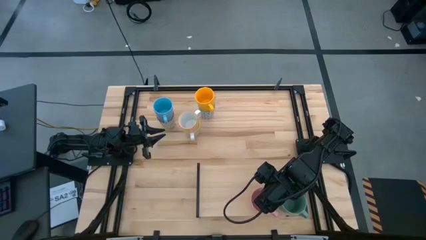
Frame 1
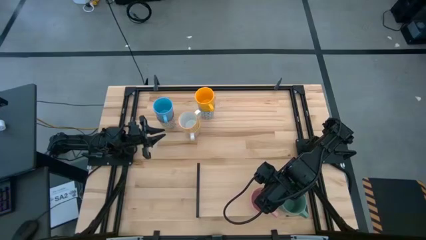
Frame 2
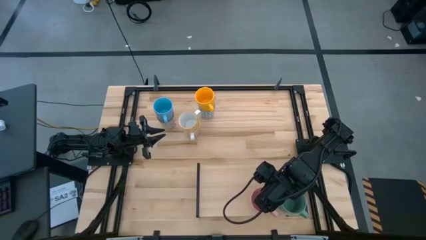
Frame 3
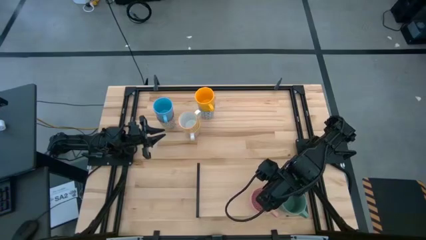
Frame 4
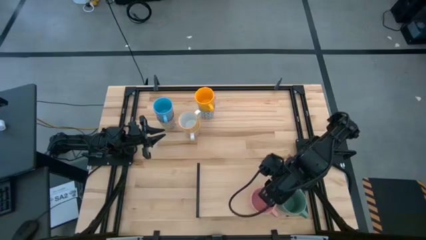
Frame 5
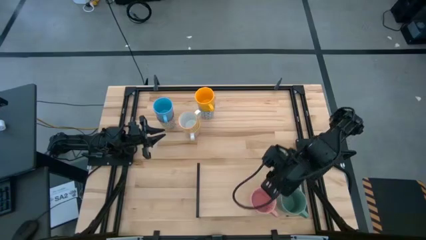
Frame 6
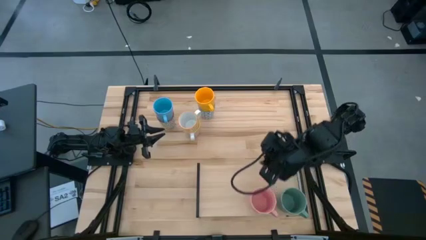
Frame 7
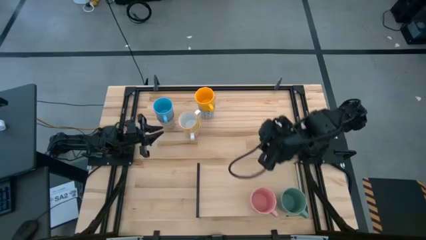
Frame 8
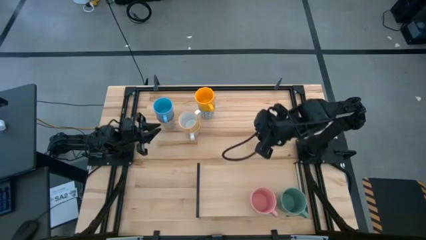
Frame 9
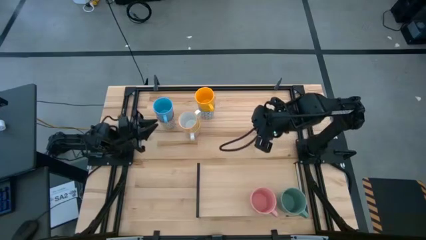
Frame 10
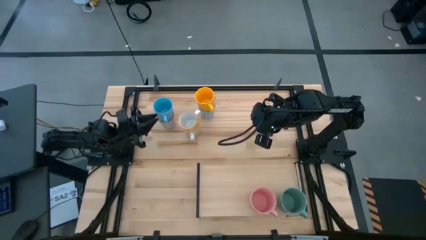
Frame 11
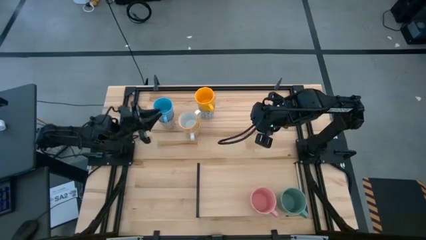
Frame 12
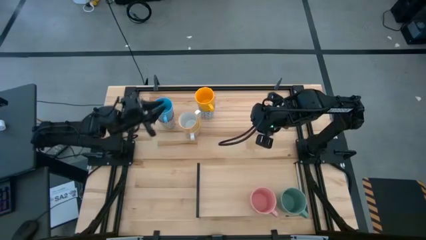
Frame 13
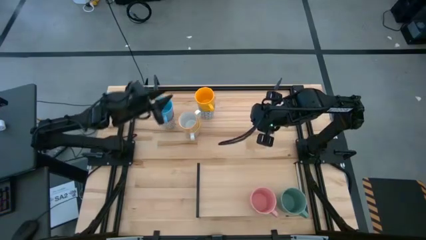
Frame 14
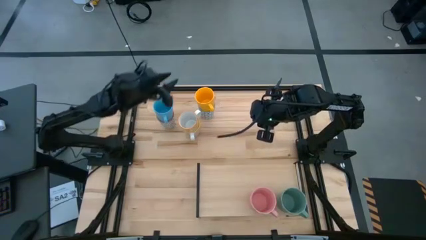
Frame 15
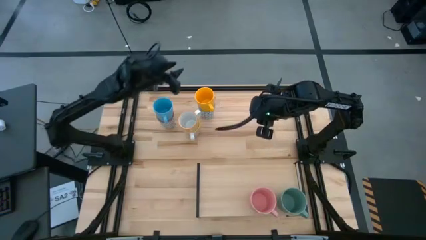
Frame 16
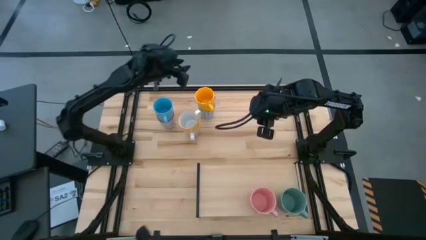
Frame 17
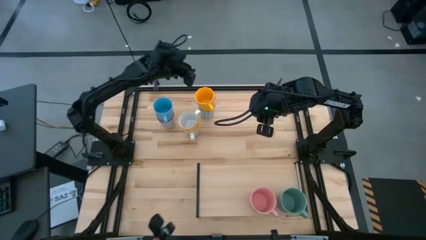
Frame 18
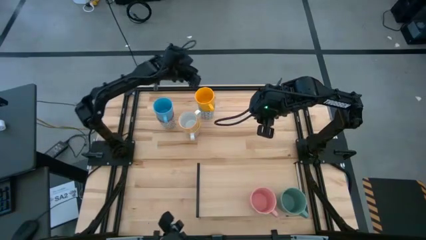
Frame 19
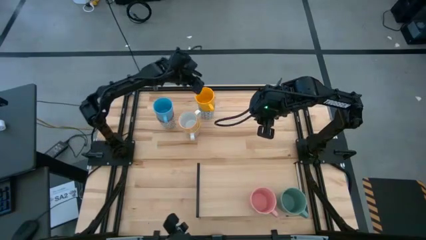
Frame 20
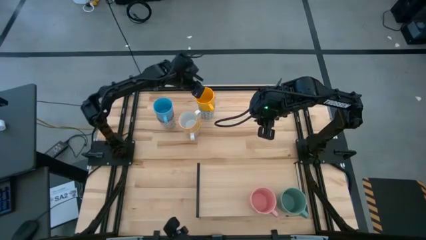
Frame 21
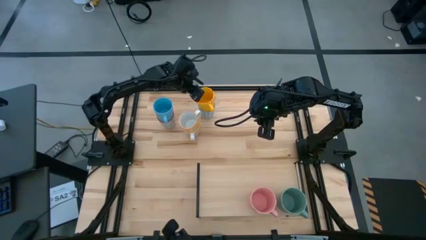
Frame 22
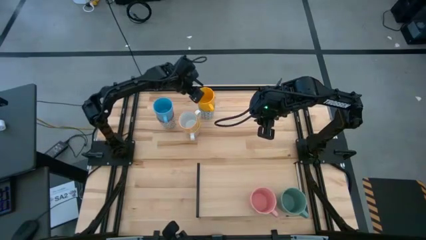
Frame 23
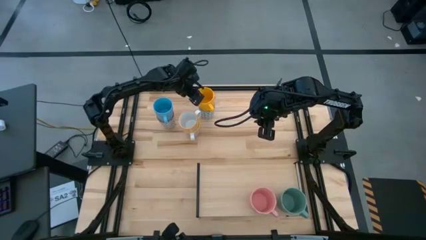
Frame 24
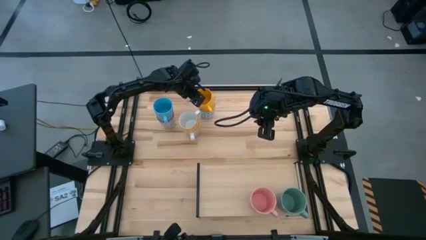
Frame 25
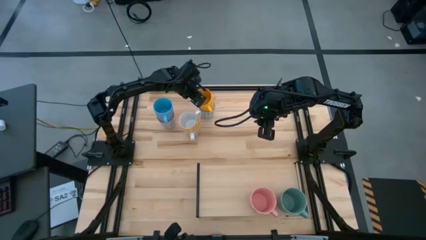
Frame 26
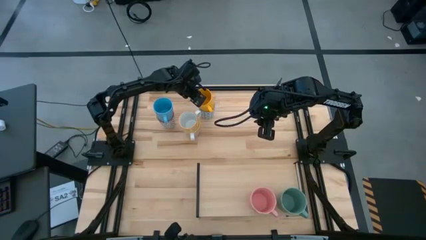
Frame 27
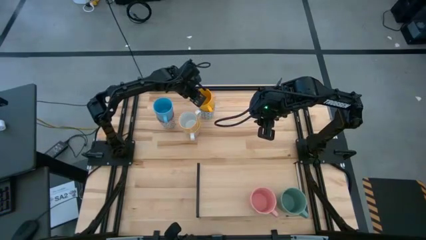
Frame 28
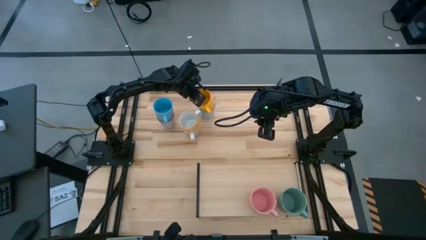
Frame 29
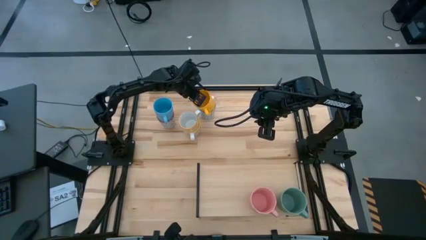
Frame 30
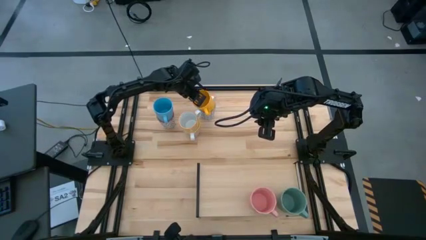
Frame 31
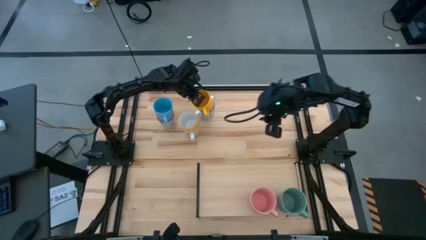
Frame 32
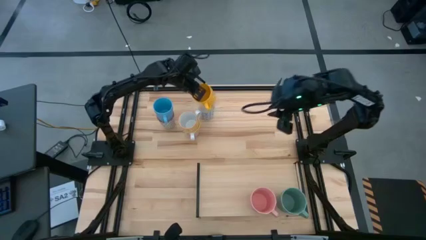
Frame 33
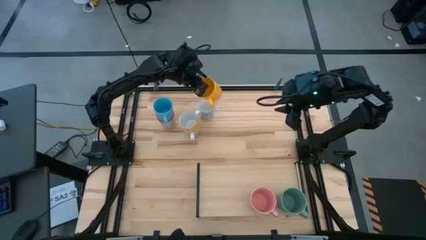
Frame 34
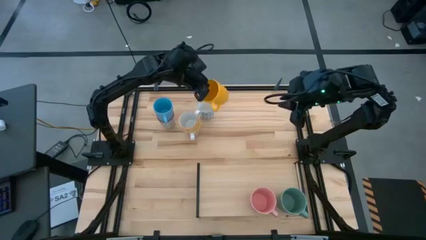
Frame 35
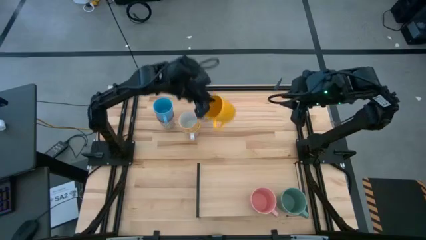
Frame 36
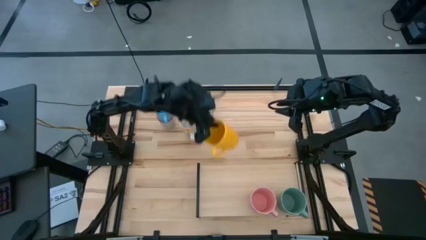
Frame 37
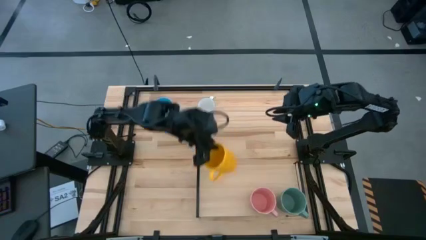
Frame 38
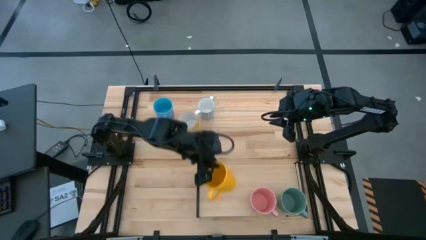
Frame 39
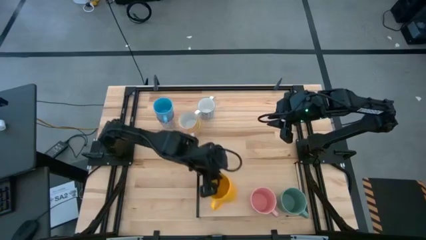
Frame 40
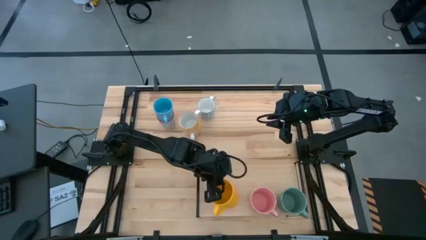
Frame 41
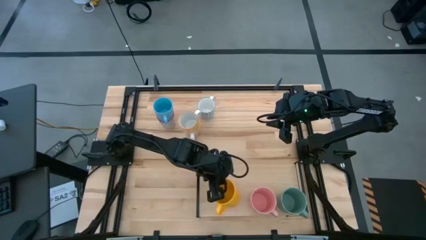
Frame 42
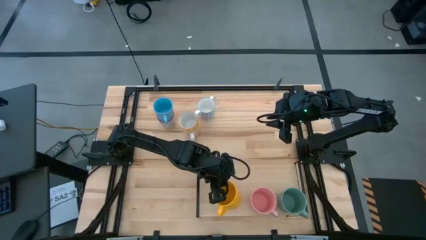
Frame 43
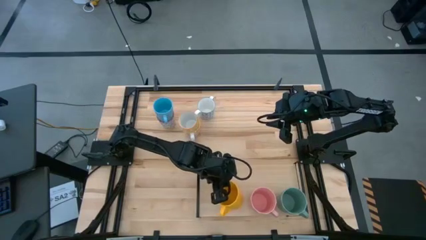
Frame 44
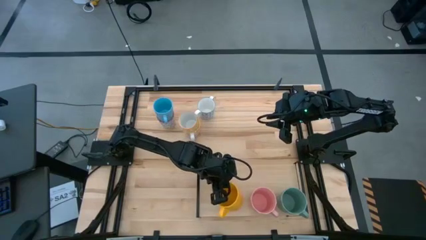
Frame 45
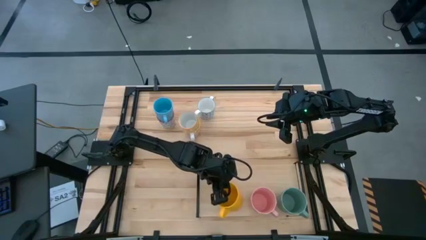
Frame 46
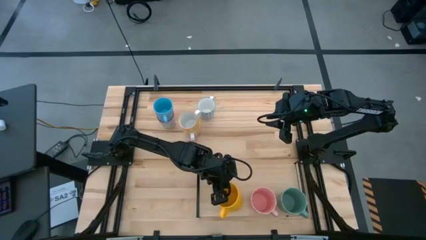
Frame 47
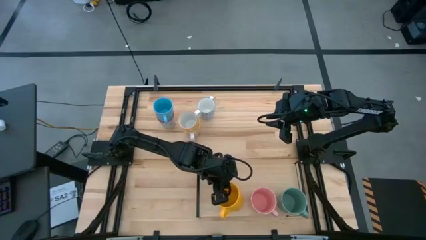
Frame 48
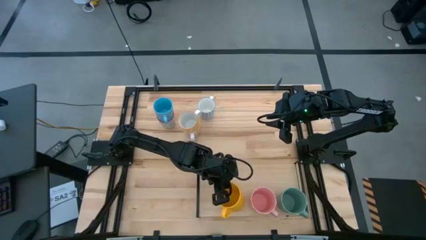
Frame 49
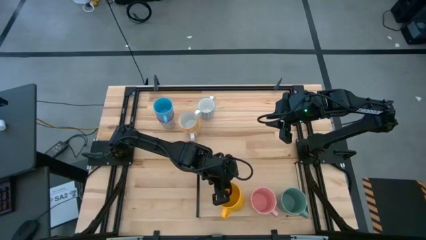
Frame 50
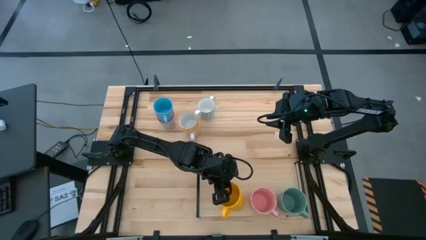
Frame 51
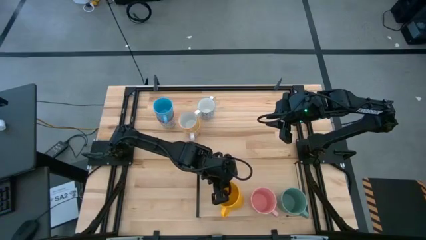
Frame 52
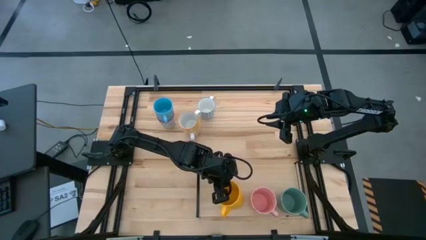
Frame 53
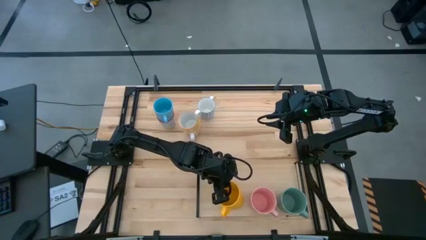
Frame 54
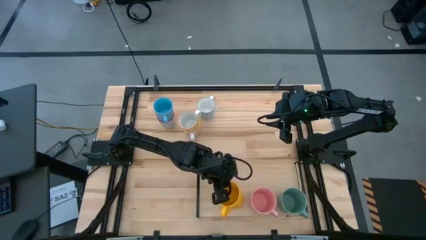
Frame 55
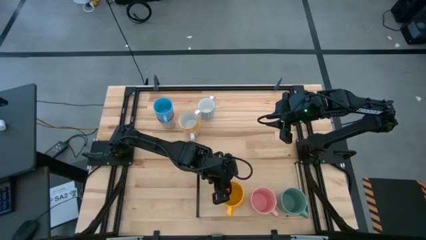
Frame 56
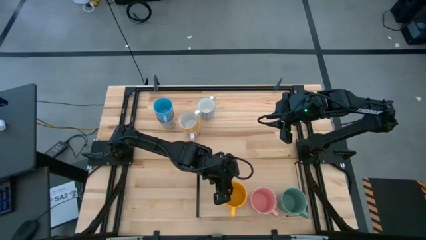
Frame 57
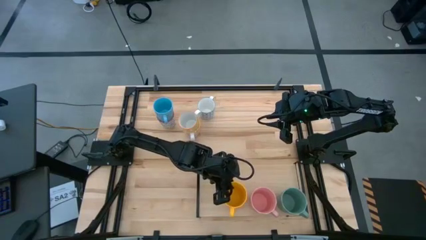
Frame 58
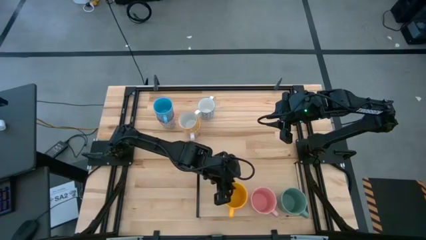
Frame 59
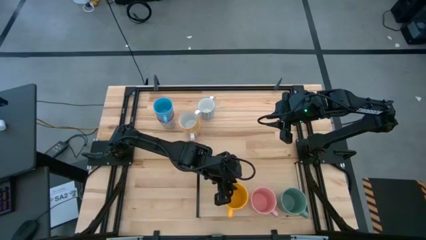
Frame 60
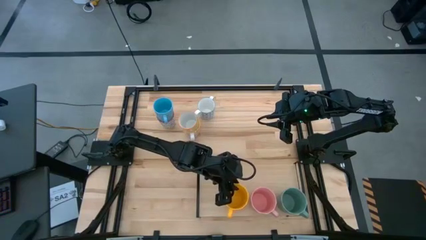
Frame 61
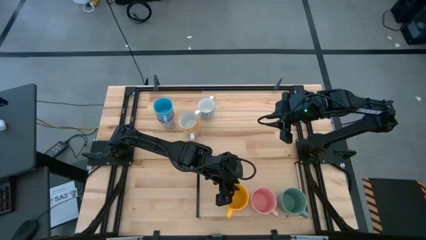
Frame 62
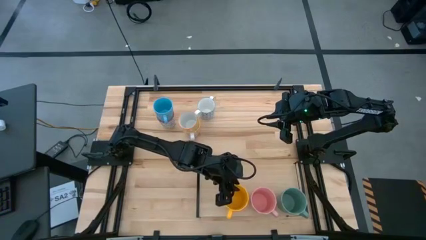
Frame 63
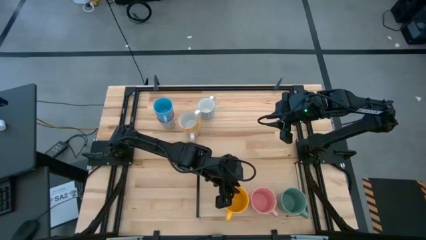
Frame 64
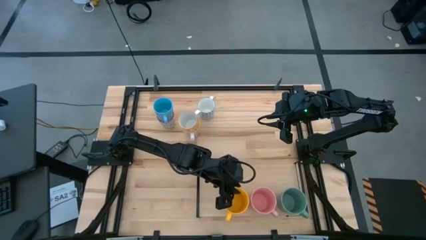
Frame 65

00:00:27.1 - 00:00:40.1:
Task: Place coffee mugs
Put the yellow mug on the shelf

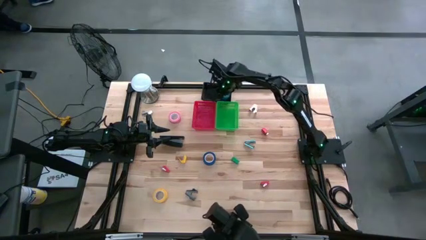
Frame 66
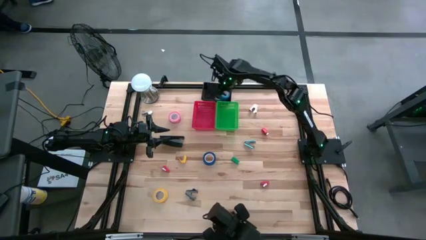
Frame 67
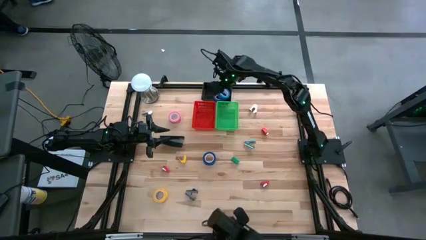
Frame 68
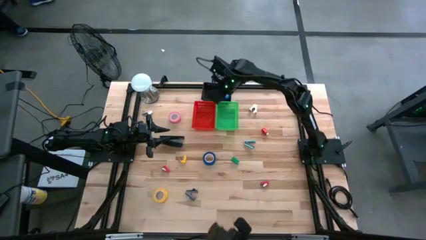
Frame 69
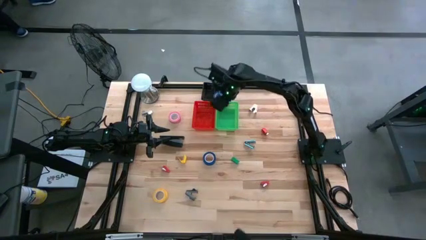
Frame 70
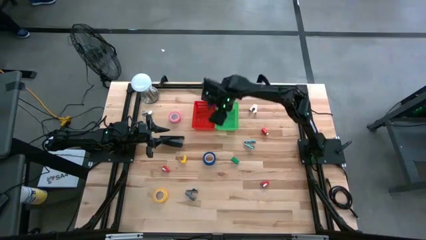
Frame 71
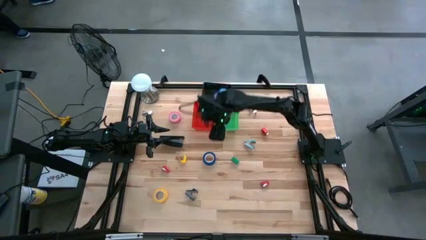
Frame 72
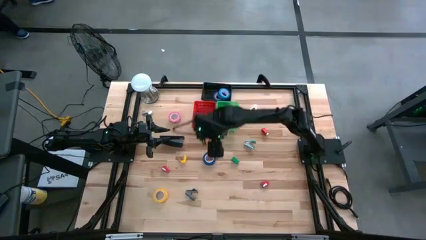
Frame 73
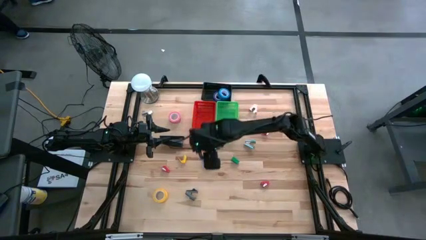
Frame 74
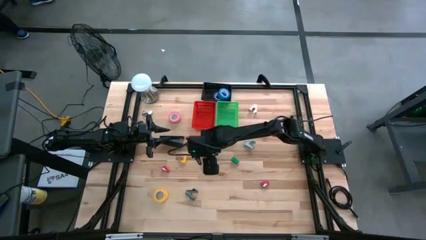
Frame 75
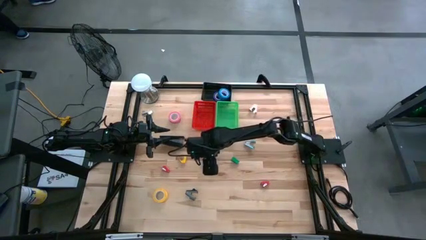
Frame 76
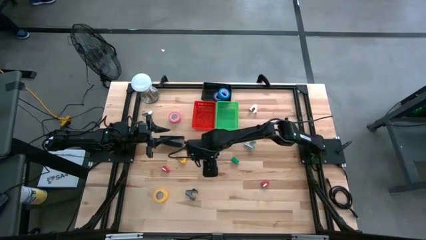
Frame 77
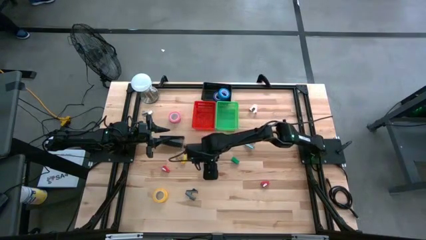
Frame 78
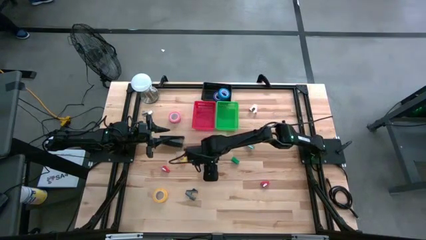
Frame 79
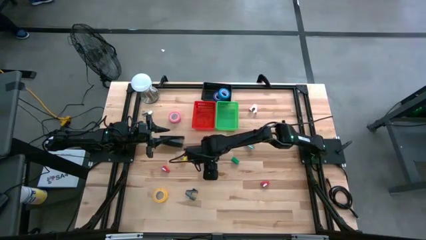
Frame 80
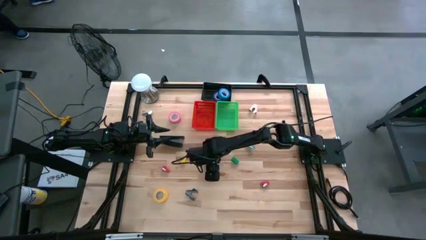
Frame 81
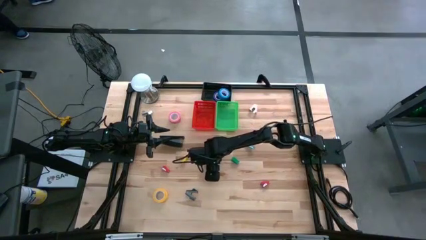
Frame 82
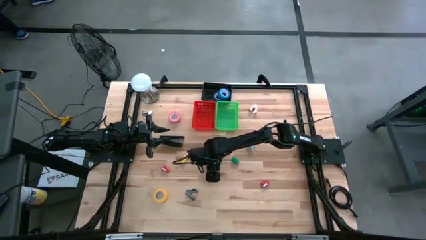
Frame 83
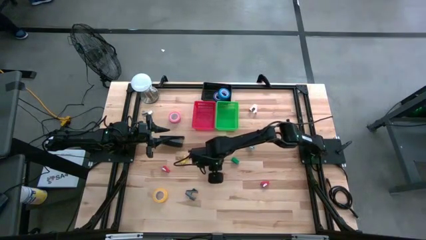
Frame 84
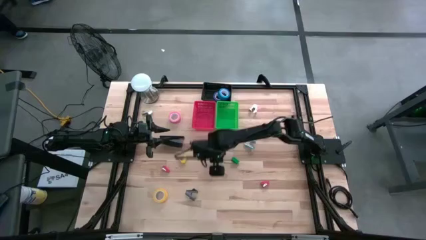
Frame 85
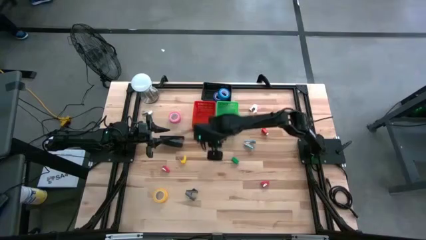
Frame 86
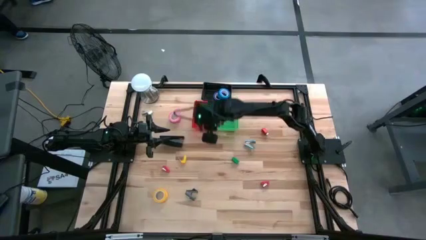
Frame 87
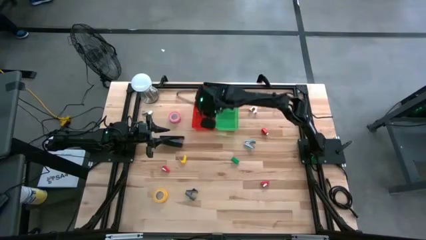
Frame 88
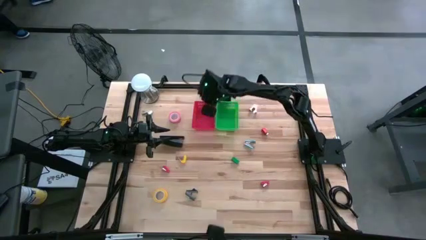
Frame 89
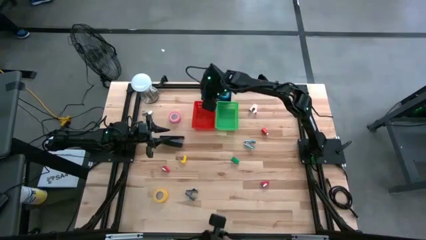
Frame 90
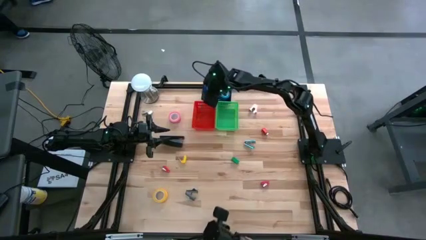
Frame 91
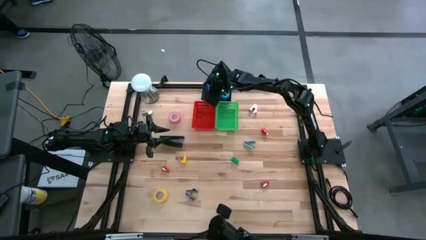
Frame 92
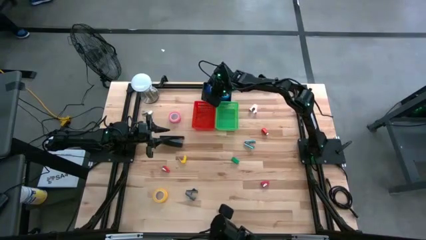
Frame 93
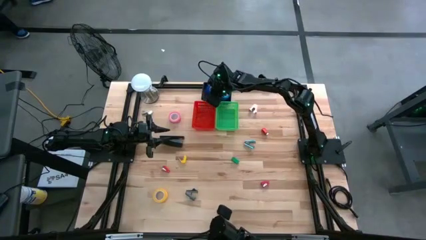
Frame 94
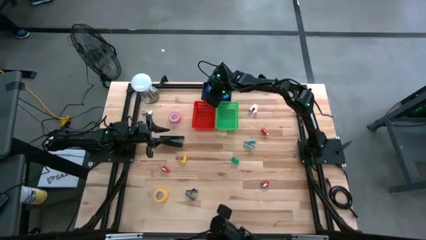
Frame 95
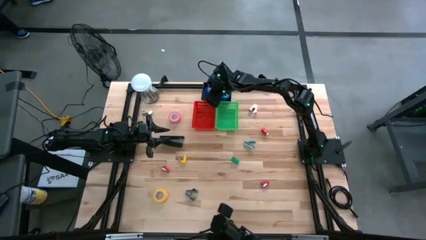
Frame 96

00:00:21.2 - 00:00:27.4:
Task: Pick and place Stapler, Stapler remover, tape
Put the dark blue tape into the black bin
